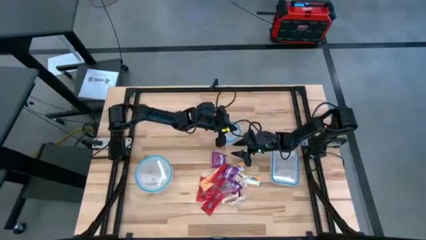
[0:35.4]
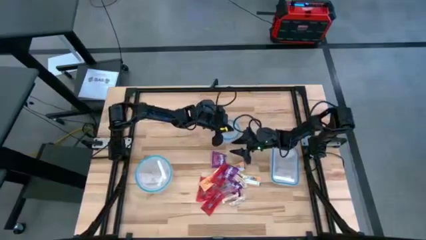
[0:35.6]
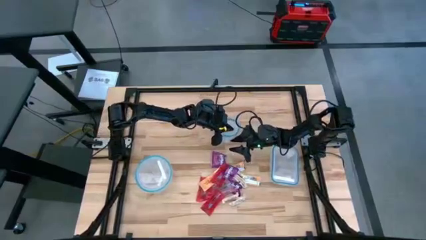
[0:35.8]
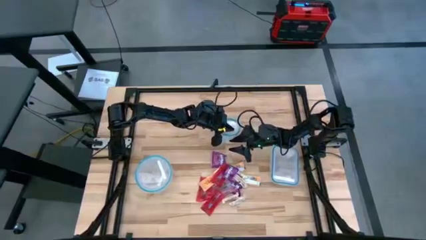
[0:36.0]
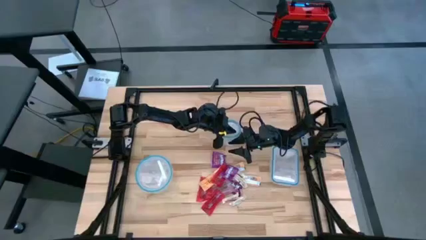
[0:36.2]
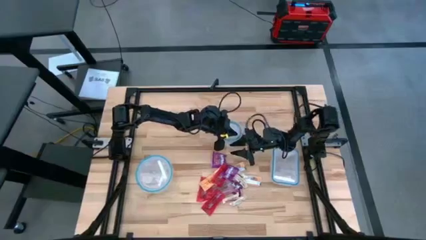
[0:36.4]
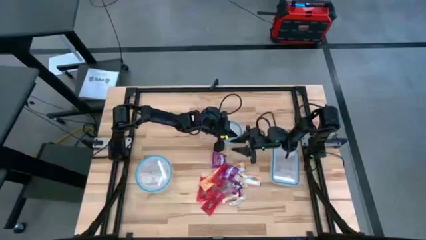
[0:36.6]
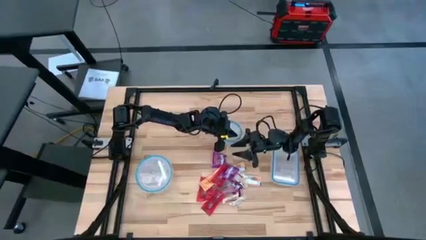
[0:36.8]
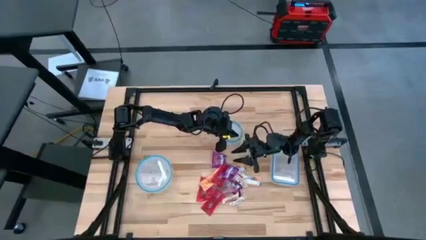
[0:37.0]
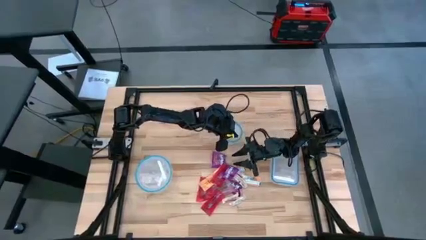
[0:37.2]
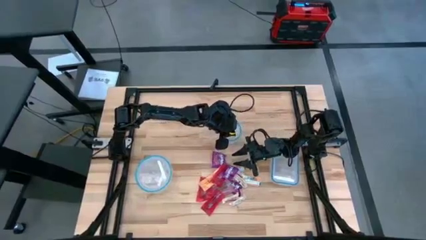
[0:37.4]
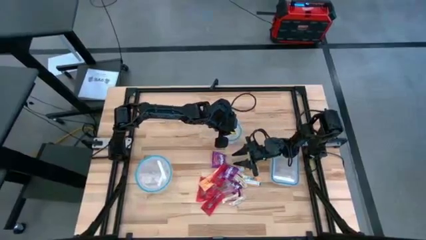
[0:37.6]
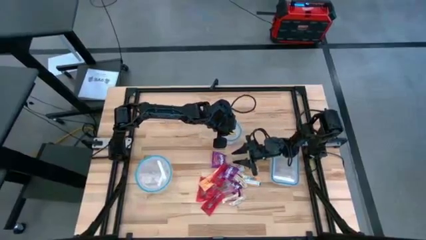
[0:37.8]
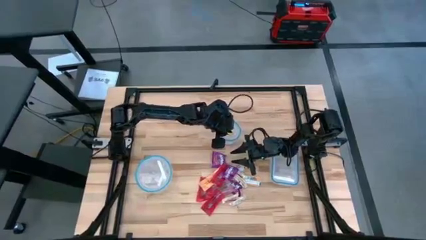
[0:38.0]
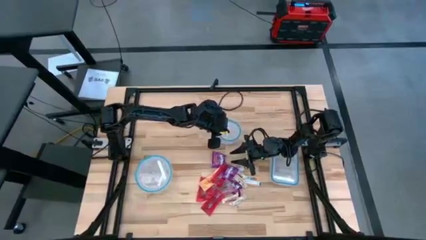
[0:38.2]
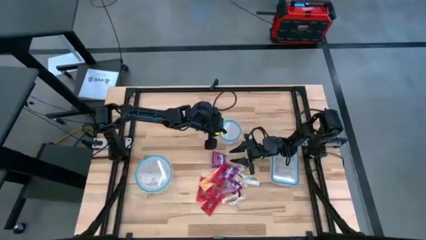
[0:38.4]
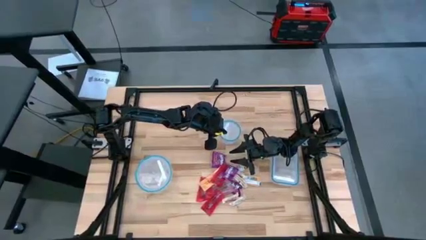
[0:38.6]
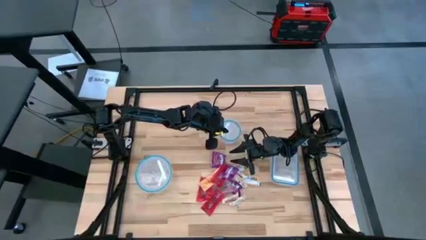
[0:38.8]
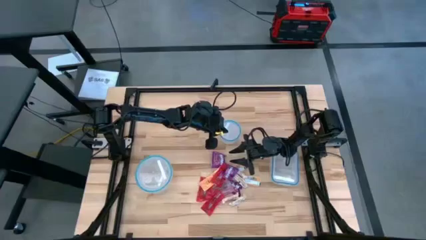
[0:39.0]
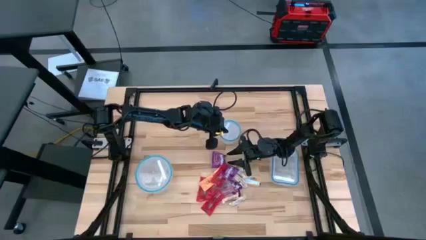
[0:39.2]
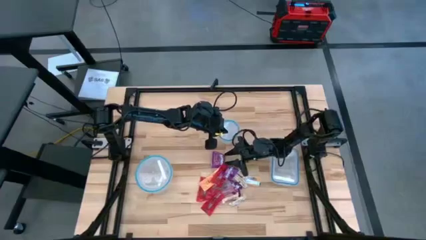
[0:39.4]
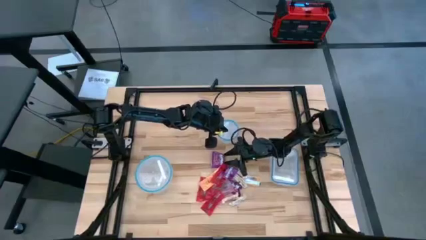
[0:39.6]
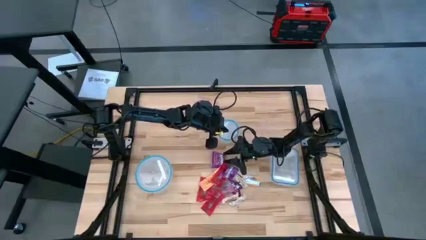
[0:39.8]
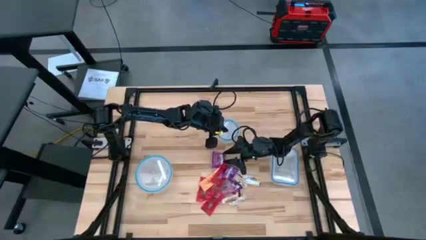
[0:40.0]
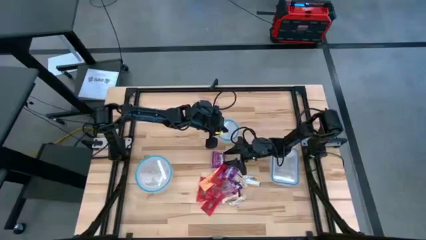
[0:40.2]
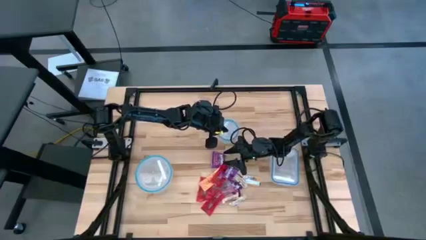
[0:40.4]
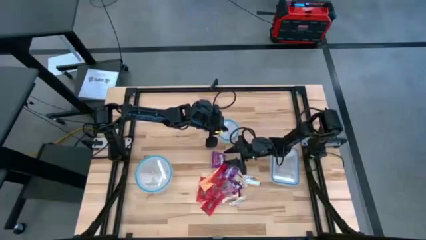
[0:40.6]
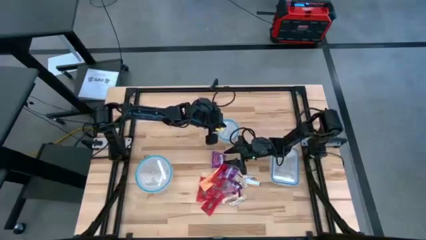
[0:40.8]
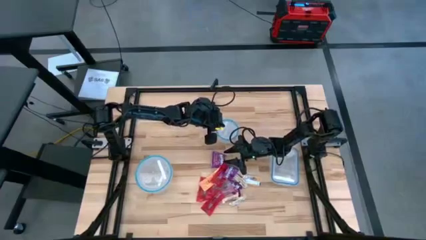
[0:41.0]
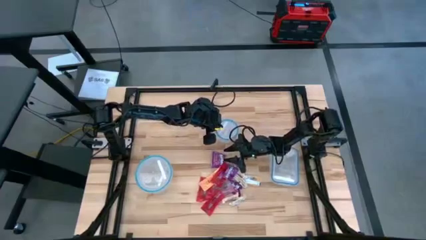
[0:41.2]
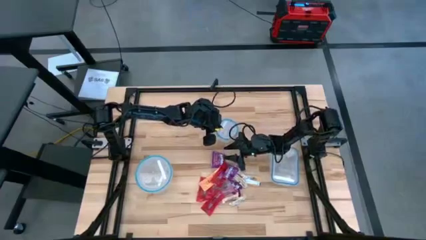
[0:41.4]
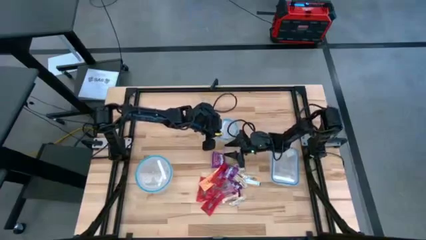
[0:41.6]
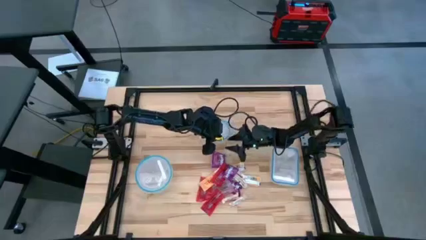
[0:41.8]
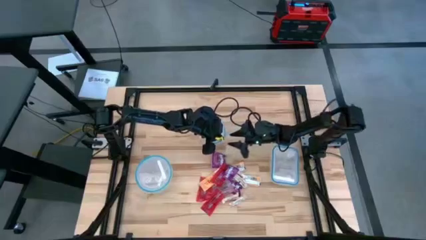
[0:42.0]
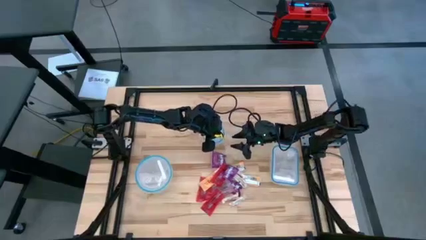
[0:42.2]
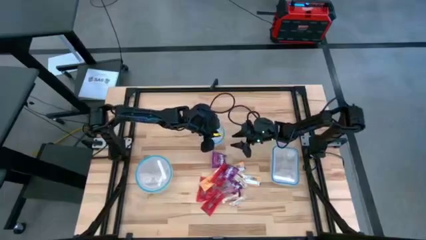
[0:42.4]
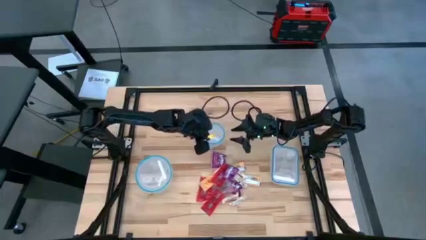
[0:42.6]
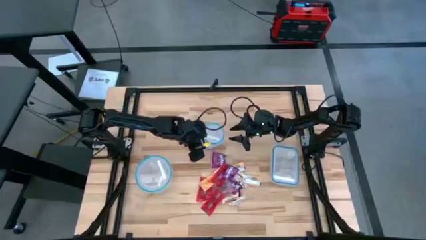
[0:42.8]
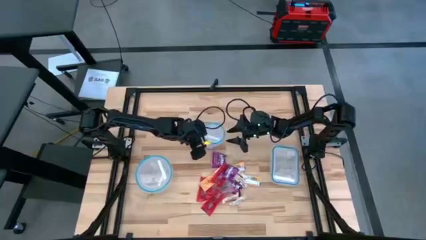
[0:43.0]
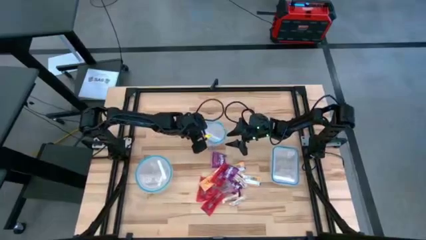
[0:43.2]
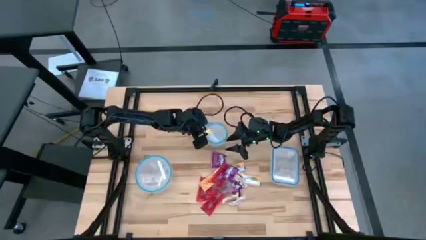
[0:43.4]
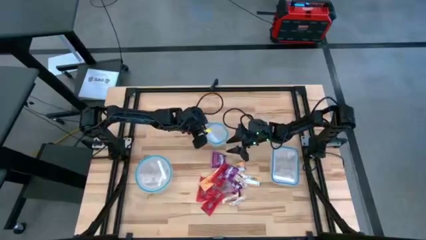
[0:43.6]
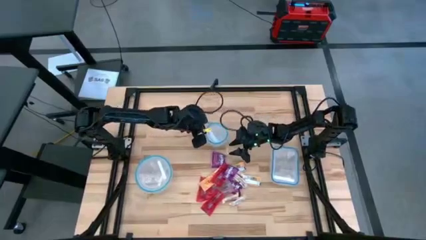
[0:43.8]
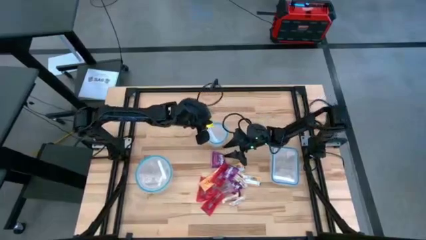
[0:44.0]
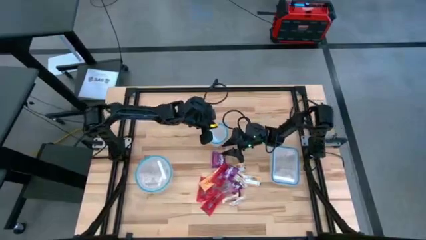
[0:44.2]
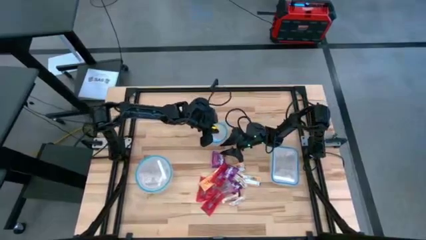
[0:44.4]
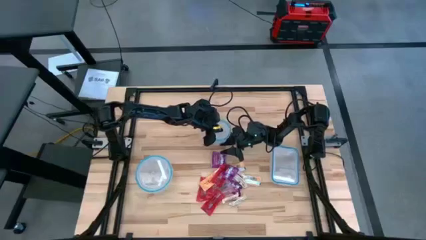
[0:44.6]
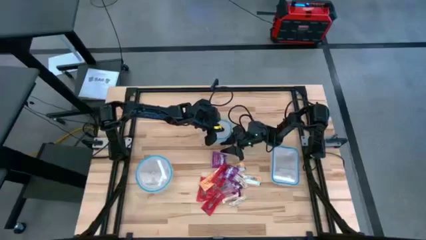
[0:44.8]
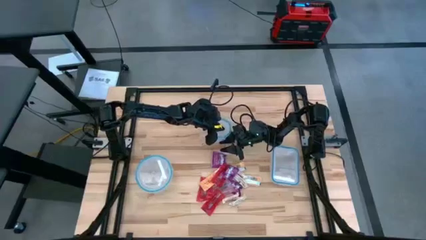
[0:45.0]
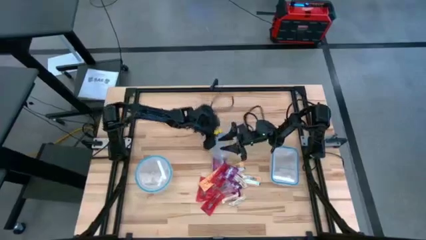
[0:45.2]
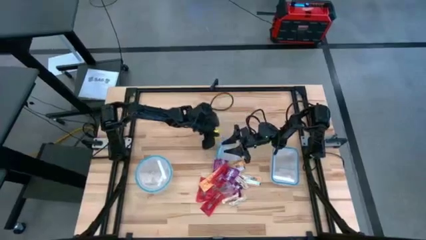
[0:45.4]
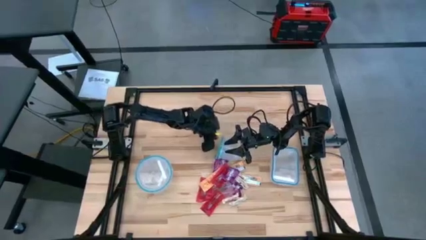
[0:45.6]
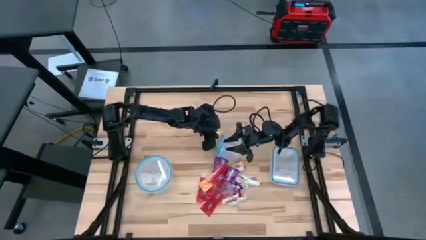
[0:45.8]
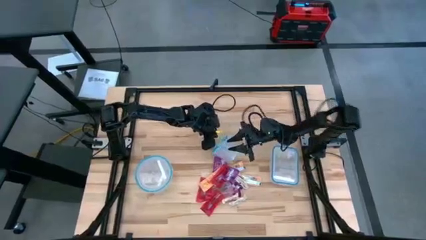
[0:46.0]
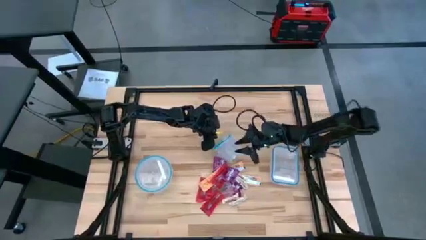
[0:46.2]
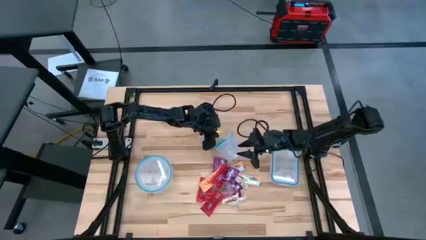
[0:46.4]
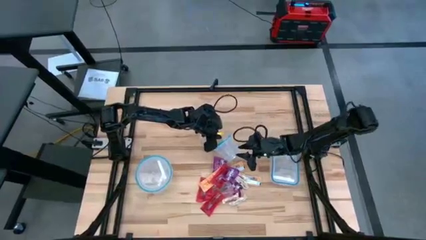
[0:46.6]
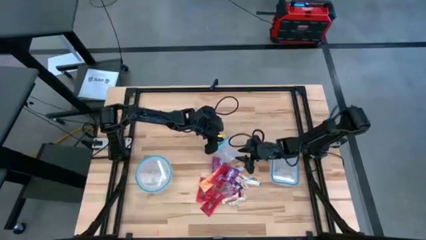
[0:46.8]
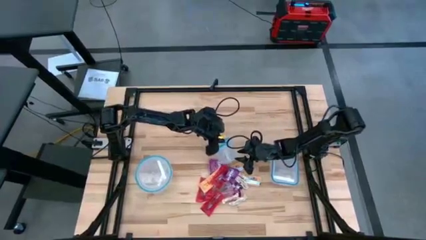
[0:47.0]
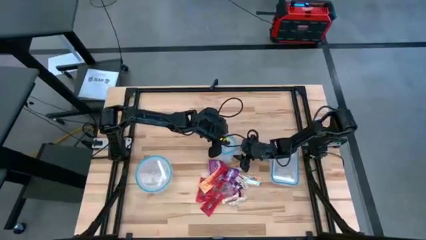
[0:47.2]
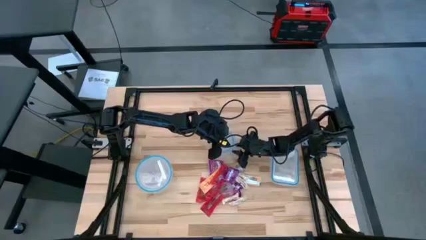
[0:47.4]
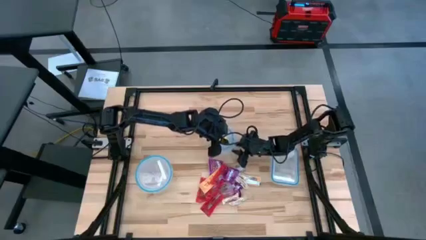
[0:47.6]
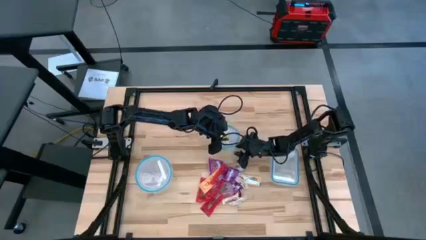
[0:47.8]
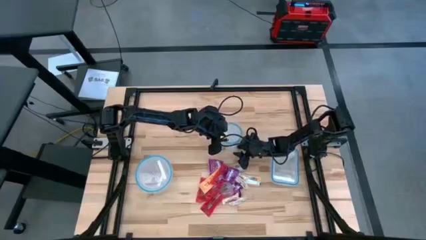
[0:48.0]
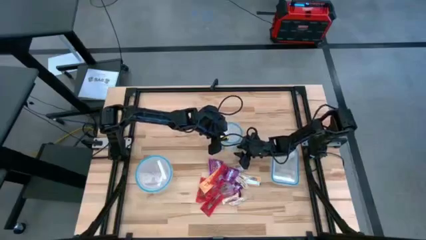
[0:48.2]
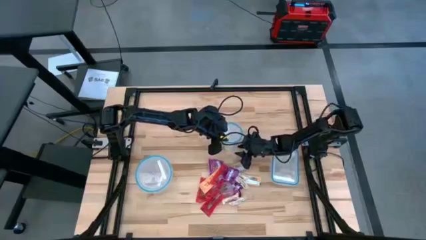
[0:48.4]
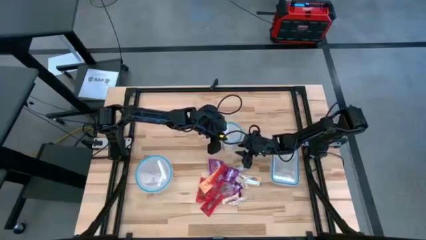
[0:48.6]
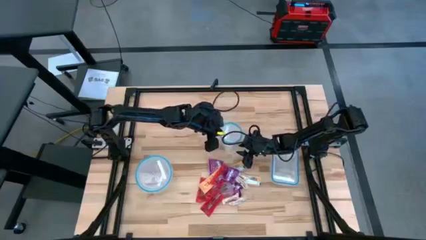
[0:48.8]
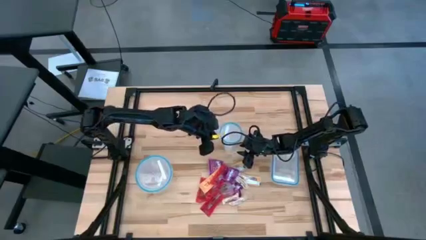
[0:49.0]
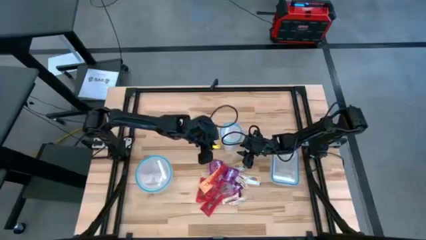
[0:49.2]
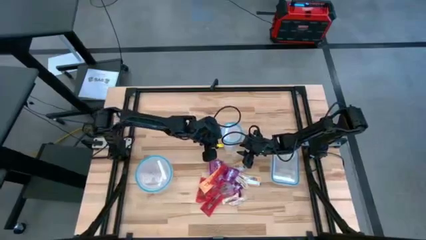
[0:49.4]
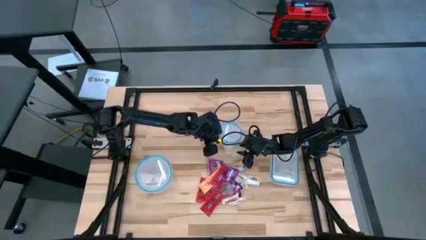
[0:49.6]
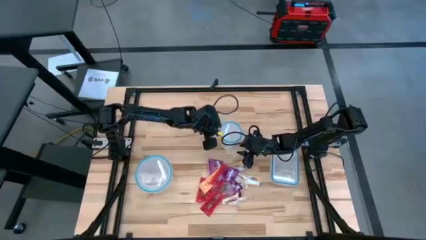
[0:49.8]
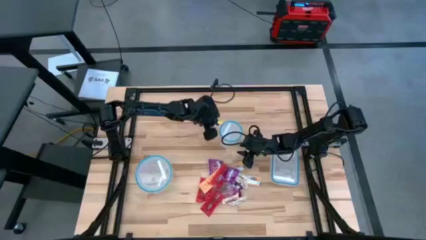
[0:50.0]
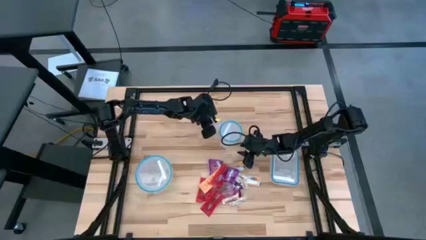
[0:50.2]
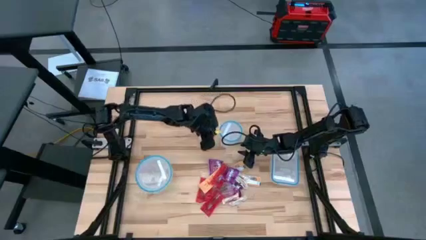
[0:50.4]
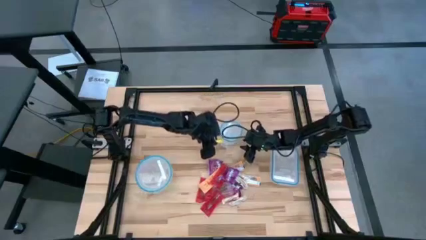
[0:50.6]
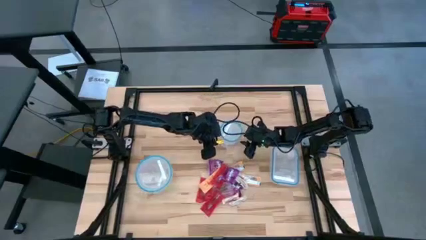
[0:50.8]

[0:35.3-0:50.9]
Task: Sort candy
Open the small circular transparent bin
